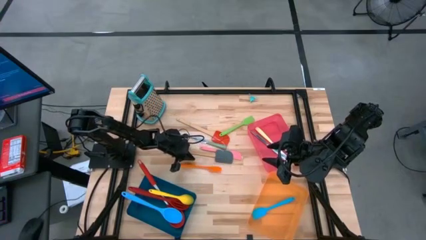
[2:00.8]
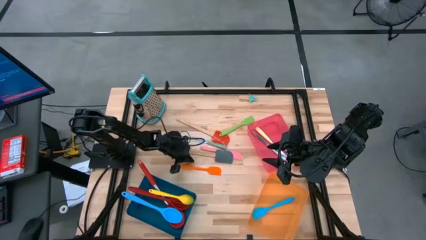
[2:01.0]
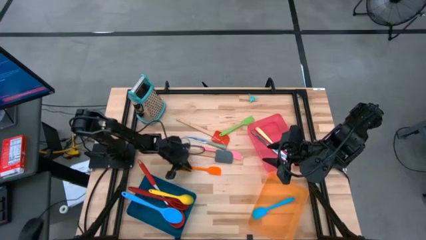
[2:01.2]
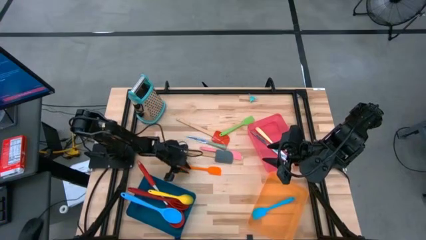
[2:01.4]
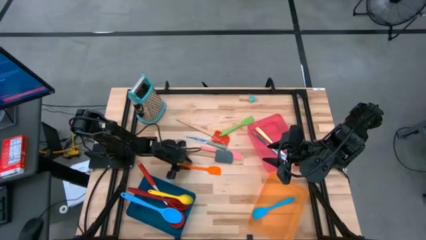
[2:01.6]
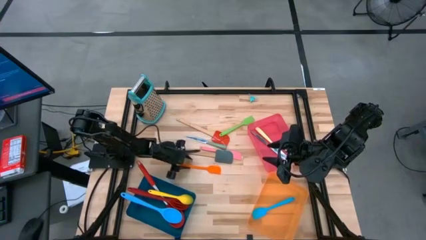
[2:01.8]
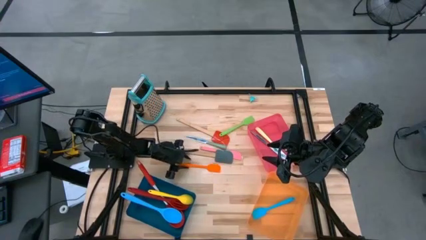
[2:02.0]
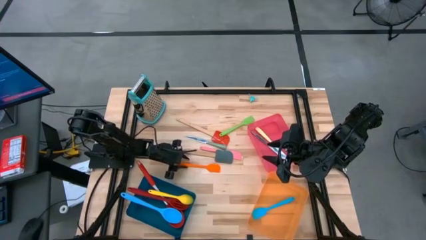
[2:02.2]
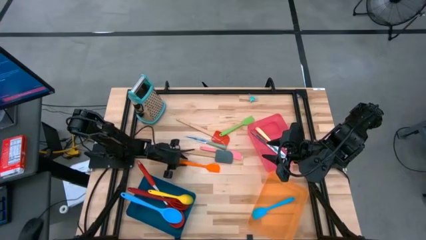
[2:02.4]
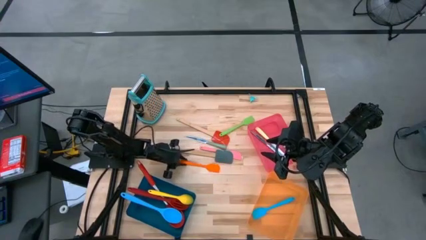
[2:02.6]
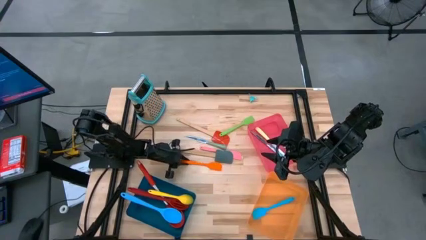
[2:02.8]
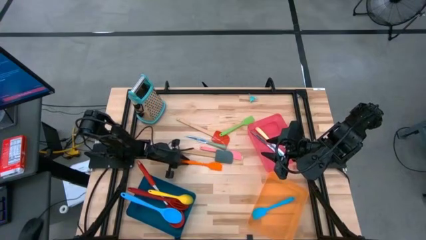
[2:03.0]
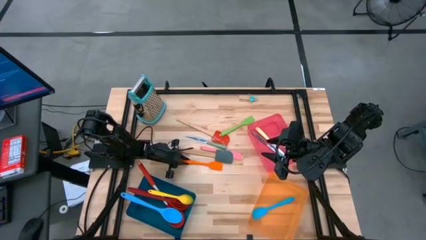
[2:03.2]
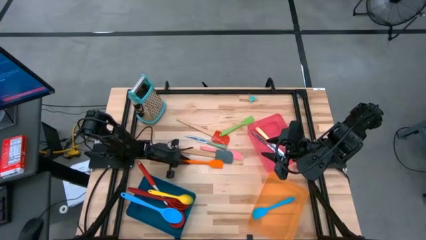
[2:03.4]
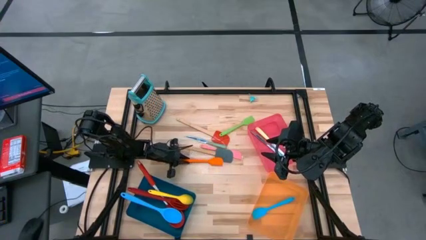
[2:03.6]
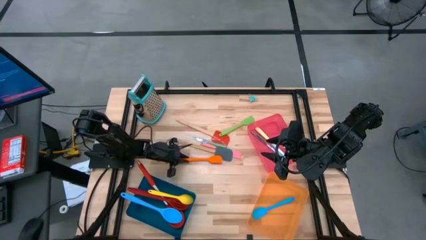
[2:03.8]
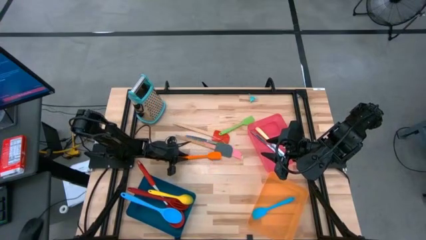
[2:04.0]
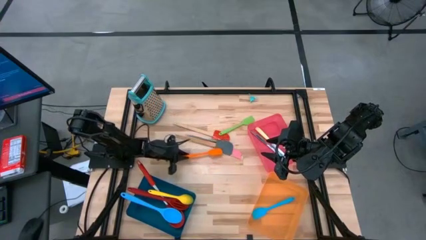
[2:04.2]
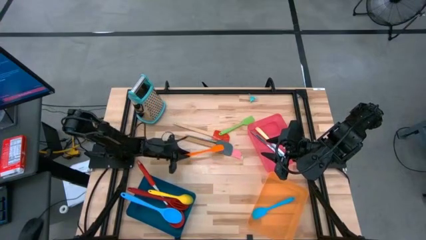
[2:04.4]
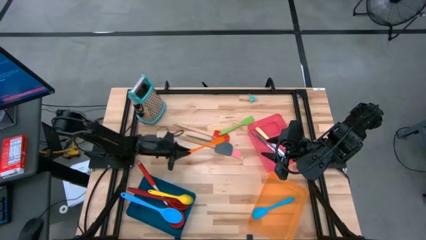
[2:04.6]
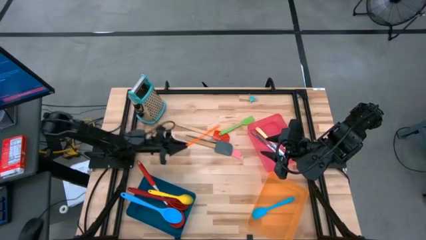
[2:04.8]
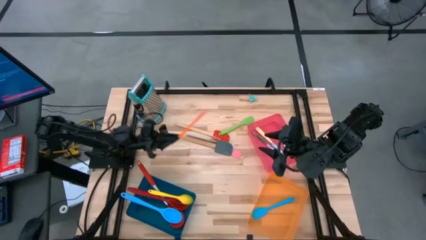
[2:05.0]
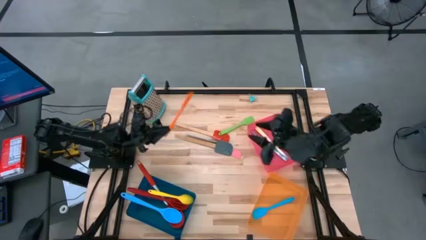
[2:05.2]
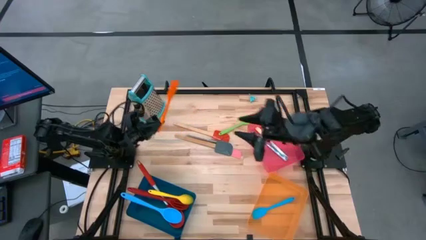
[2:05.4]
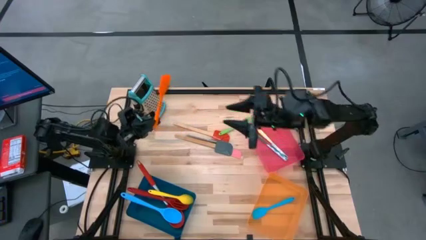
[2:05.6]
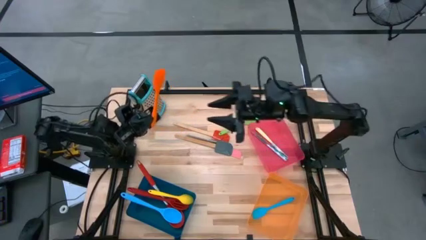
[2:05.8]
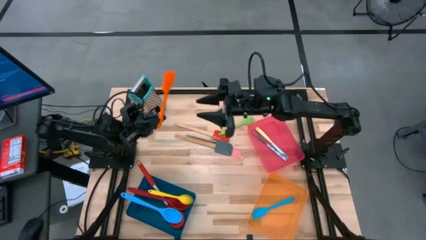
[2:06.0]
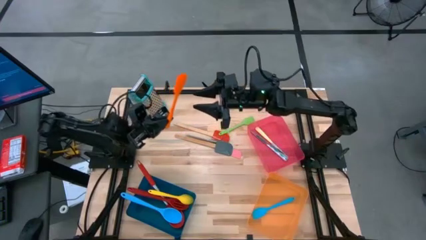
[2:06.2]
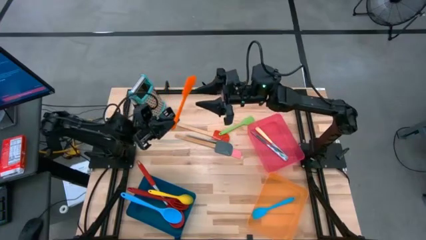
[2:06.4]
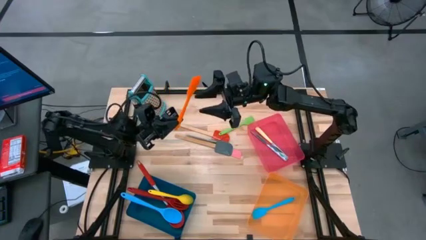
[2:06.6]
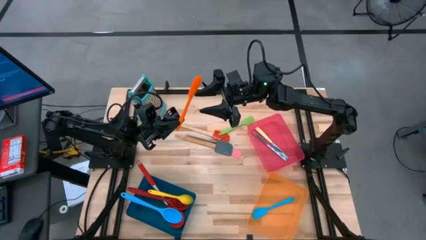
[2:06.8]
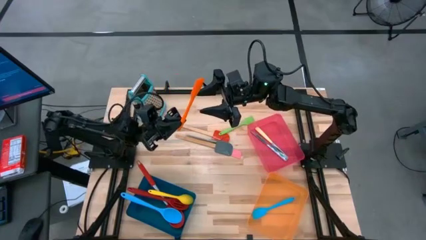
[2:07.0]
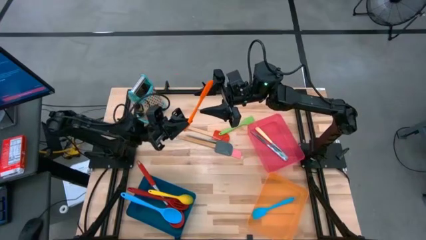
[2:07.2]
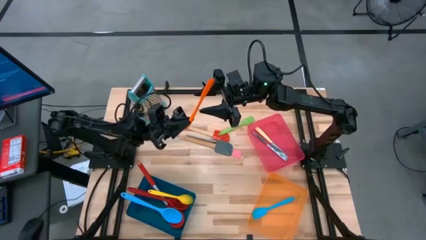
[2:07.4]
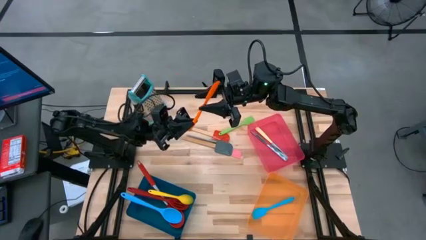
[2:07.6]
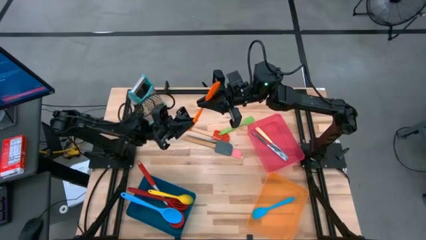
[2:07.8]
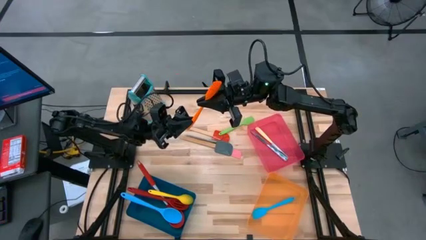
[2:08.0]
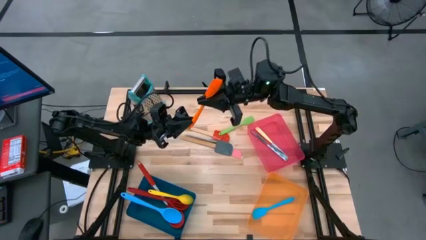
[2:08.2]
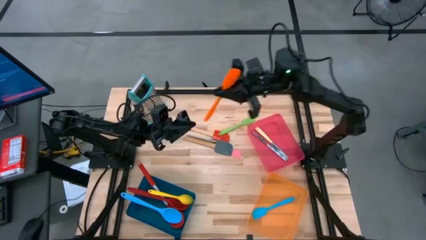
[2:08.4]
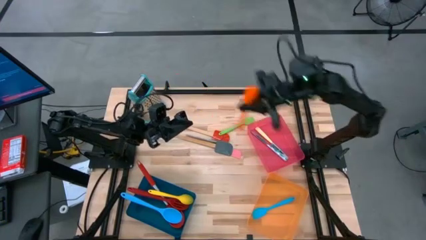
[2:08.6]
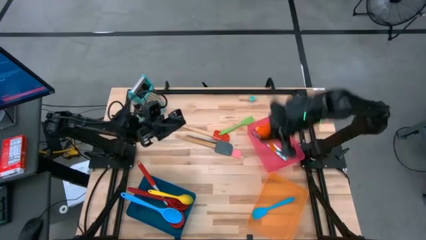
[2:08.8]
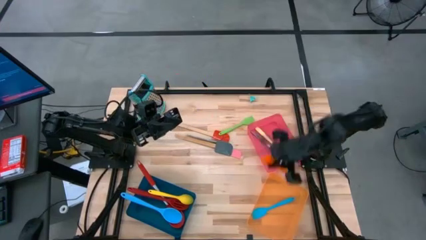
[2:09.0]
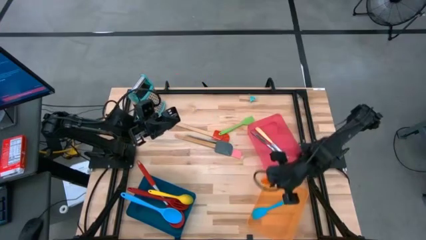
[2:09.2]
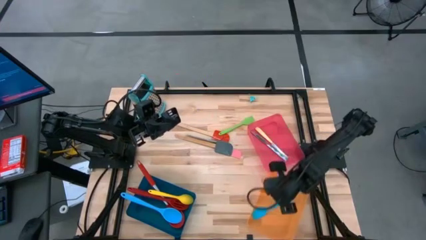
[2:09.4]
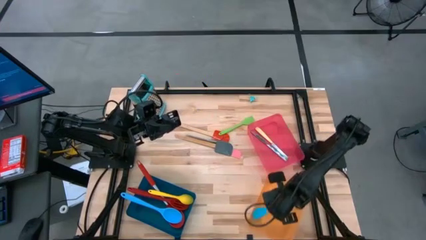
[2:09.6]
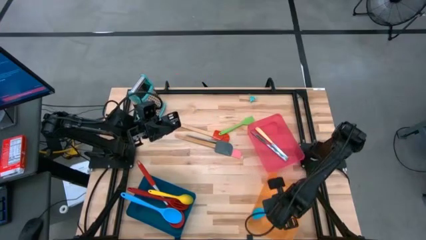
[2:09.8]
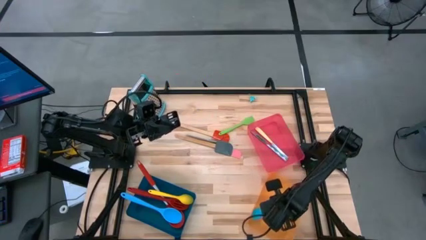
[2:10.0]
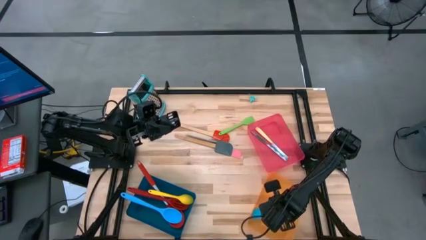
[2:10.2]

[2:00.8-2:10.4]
Task: Pick & Place Kitchen Items
Put the orange spatula into the orange bin

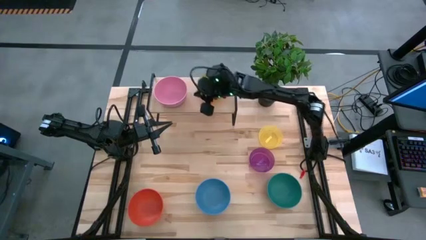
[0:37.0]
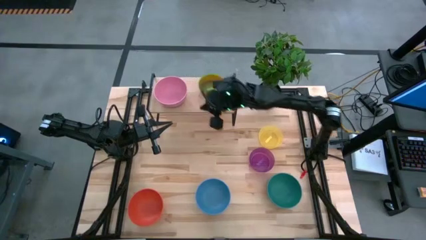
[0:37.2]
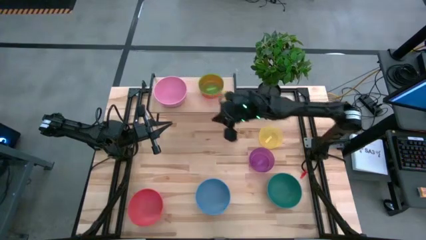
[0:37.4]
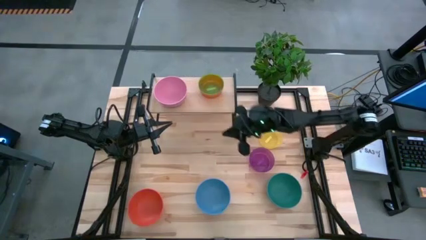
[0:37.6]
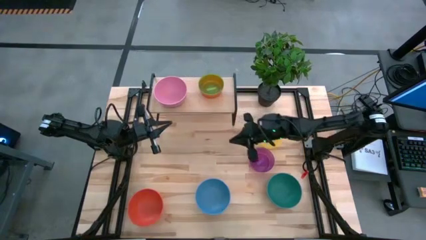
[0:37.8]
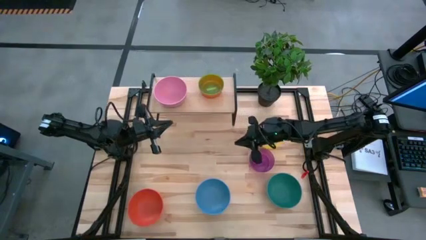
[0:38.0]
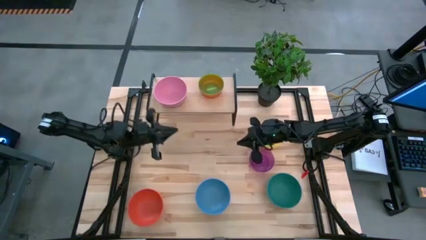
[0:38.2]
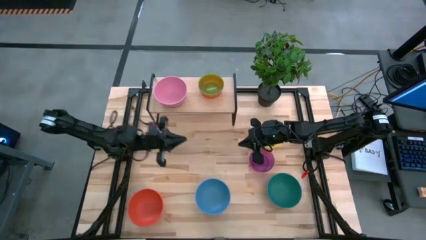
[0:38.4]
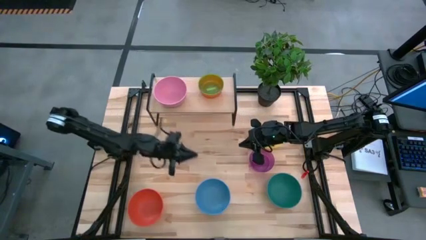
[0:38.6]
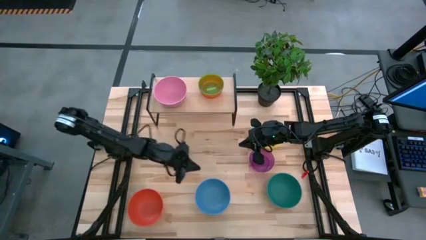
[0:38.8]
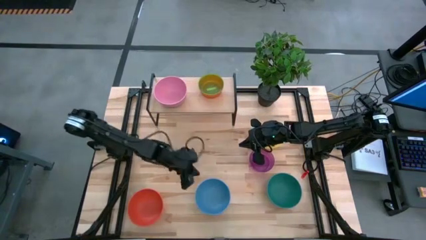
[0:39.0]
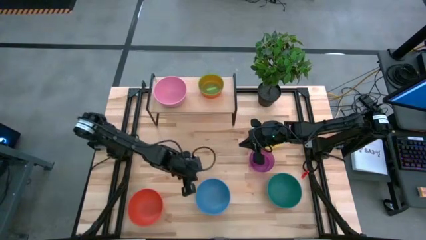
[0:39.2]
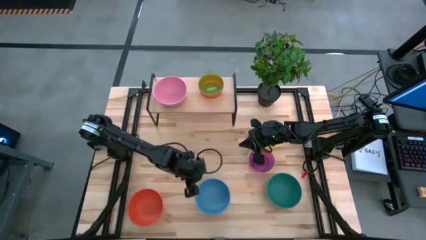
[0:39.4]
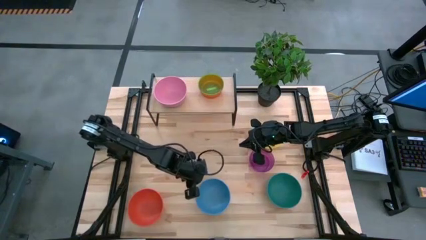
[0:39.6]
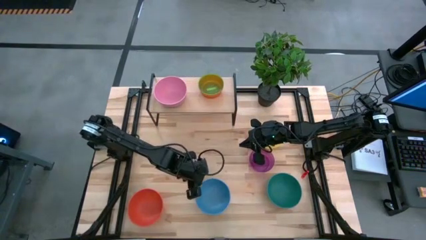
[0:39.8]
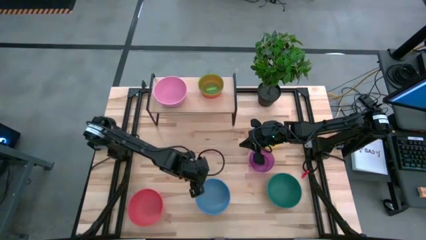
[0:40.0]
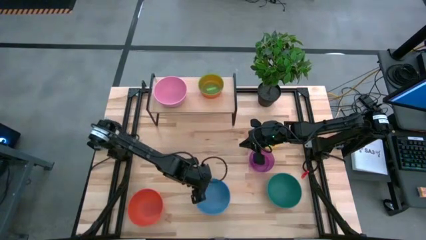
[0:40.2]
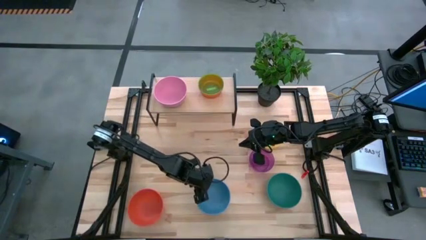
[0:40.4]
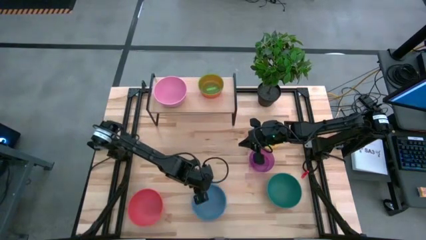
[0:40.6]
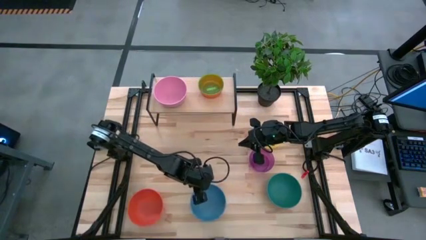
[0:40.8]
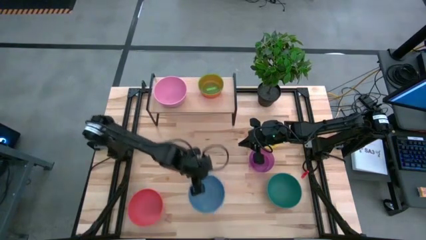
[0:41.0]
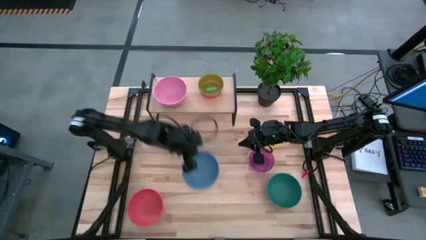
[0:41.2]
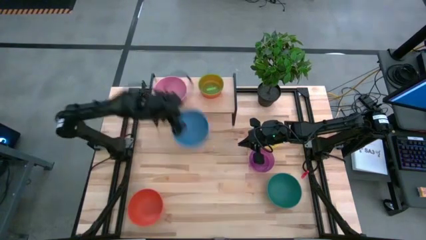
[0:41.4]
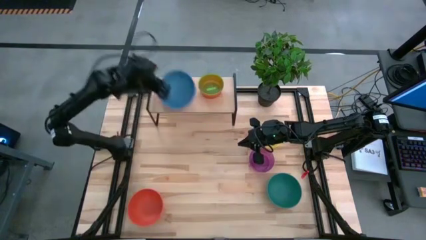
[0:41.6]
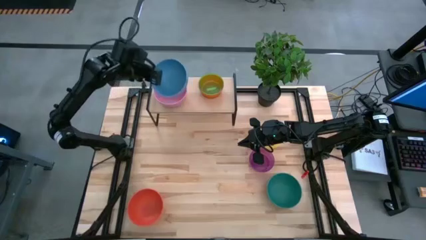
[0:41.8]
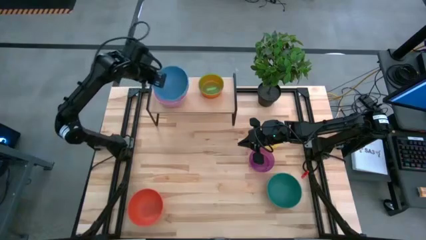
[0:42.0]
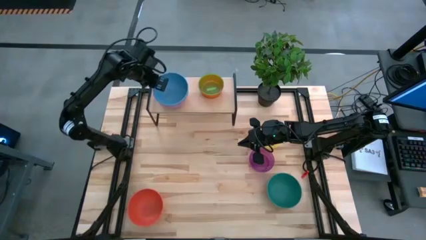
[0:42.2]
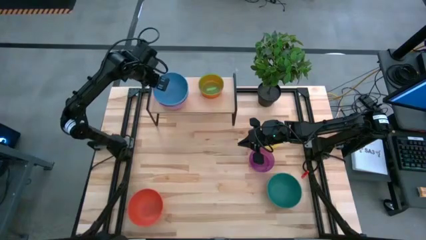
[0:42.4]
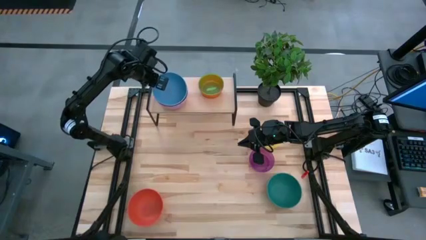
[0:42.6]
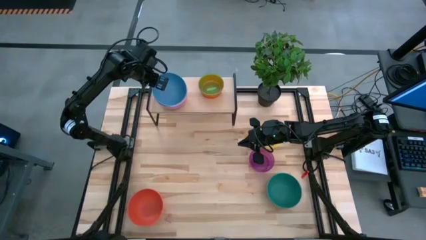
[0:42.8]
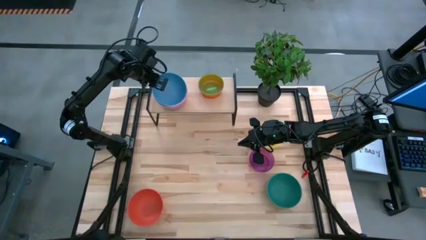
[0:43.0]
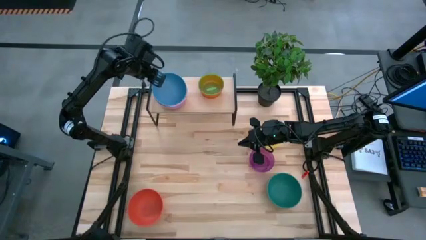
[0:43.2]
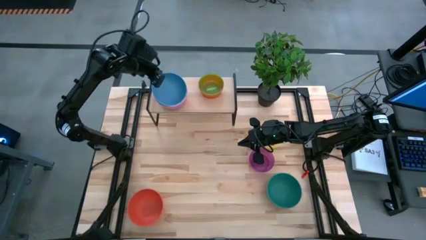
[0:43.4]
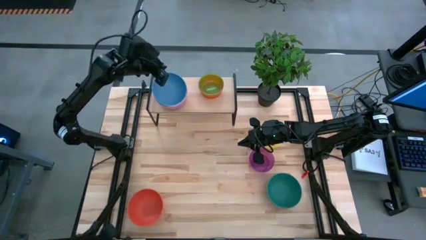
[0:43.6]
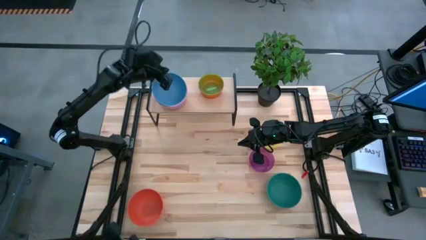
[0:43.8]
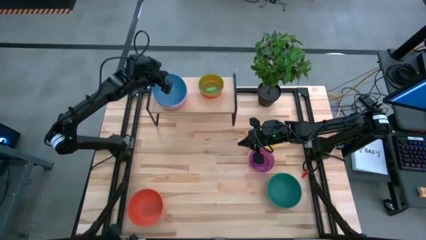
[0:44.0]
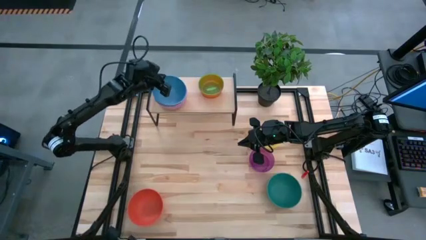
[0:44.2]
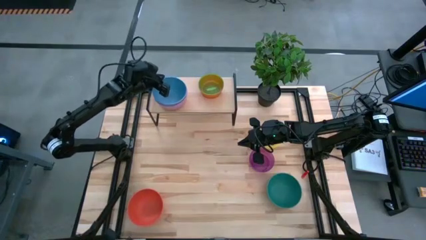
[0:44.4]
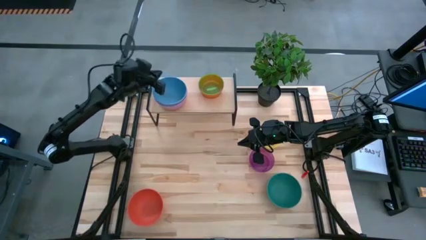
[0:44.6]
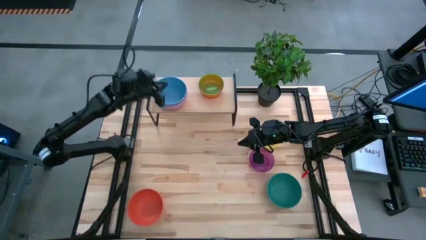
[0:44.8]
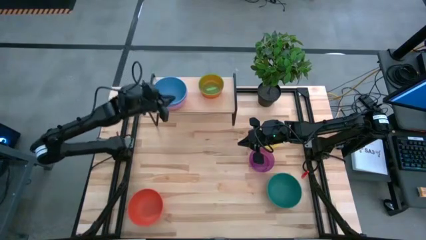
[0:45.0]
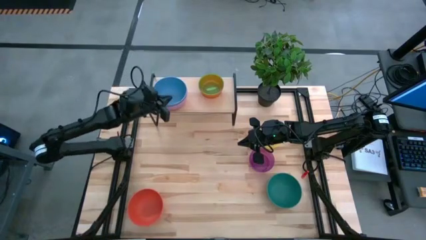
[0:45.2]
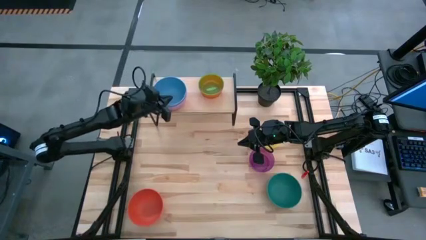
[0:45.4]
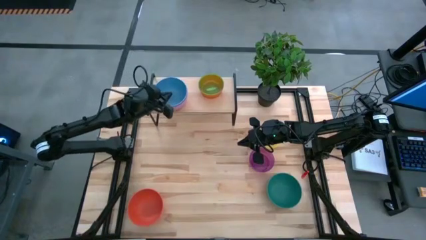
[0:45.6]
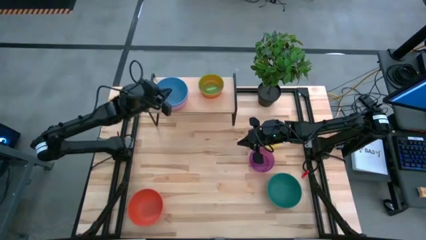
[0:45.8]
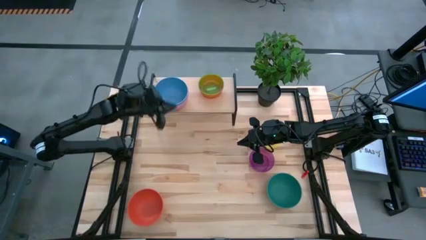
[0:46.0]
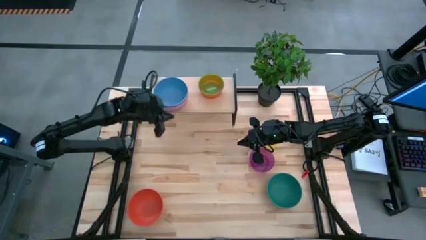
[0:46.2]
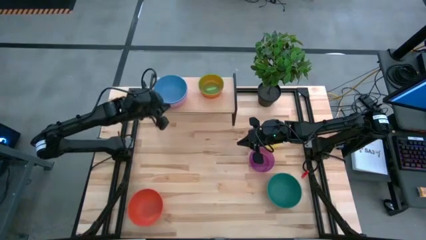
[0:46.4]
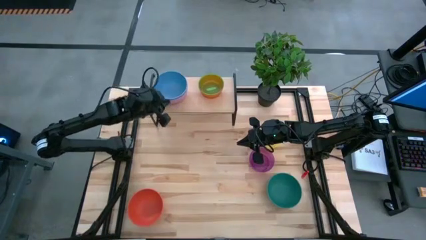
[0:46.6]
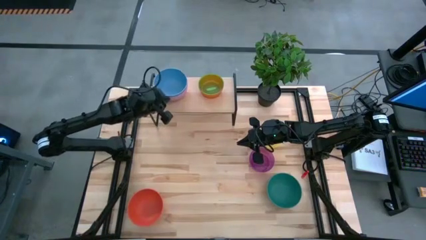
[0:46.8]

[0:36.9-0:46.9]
Task: Place and stack bowls onto a shelf
Stack the big blue bowl on top of the big pink bowl on the shelf
